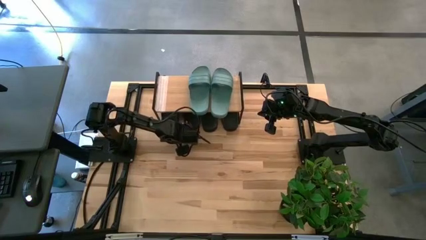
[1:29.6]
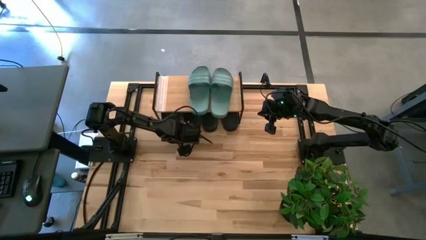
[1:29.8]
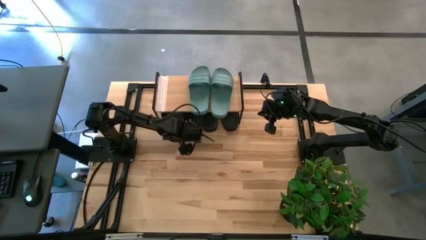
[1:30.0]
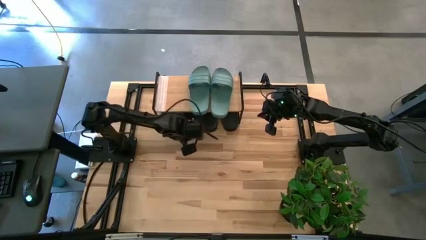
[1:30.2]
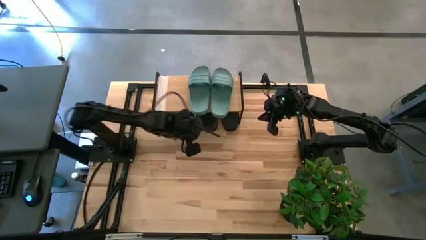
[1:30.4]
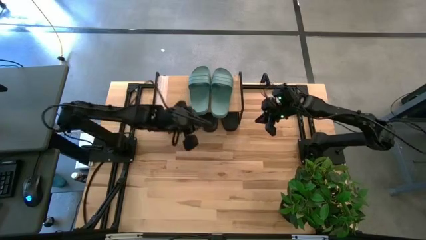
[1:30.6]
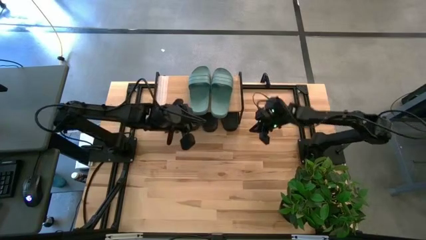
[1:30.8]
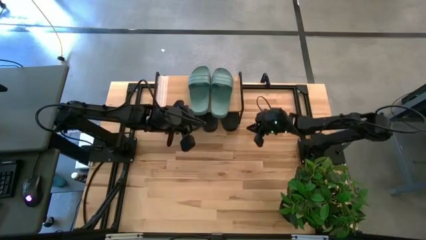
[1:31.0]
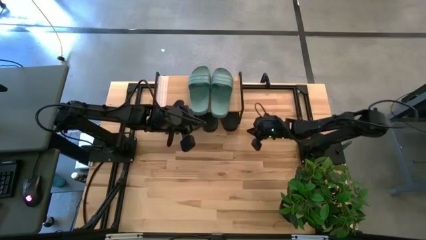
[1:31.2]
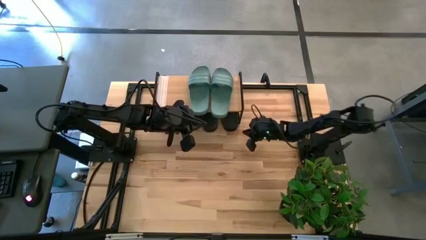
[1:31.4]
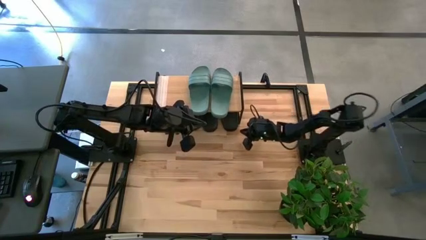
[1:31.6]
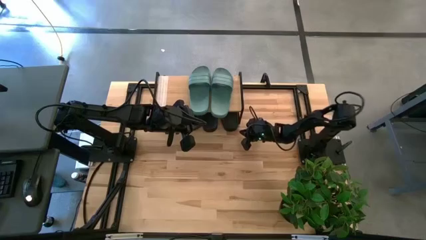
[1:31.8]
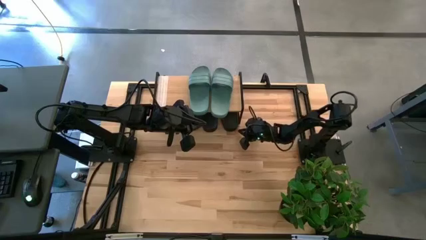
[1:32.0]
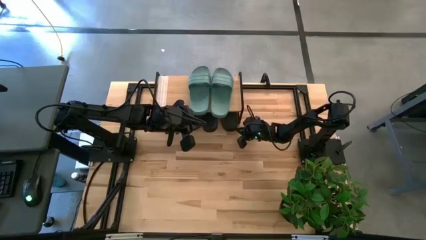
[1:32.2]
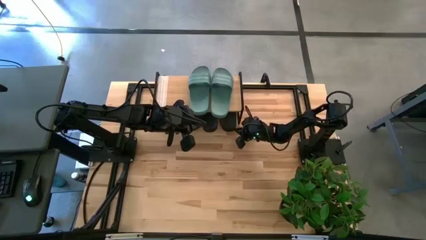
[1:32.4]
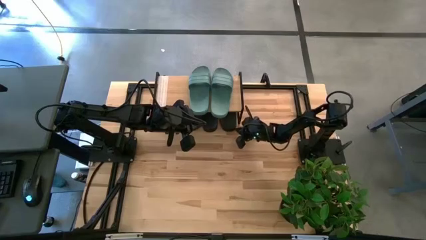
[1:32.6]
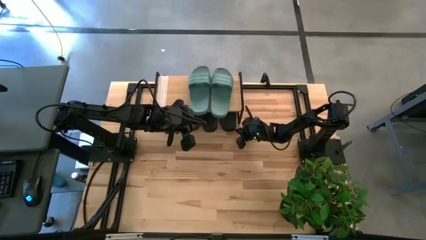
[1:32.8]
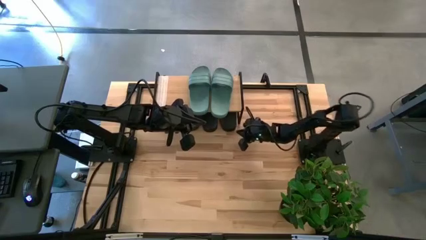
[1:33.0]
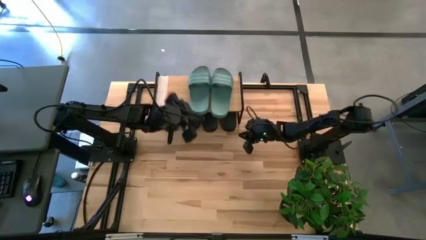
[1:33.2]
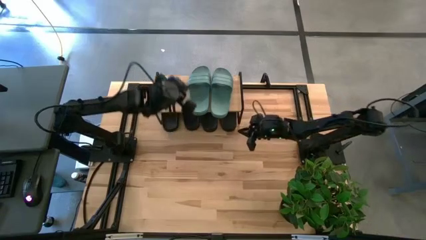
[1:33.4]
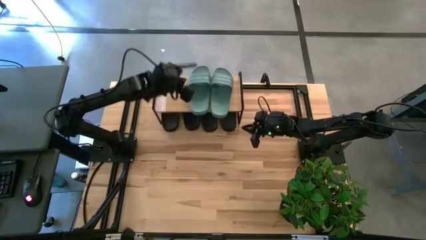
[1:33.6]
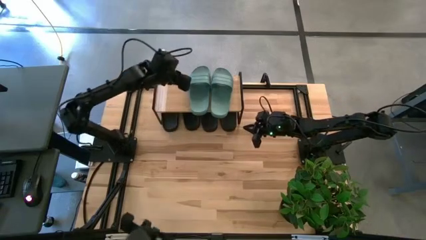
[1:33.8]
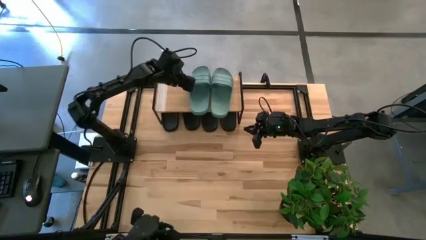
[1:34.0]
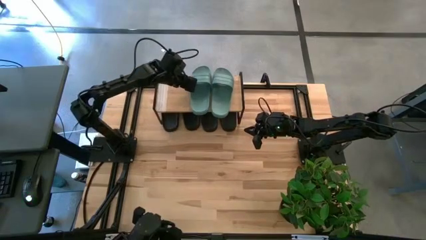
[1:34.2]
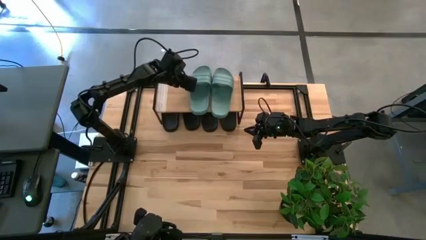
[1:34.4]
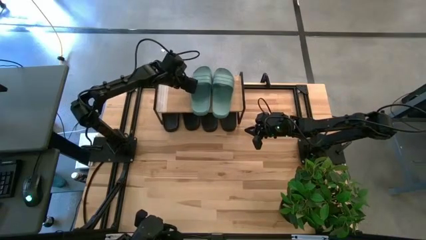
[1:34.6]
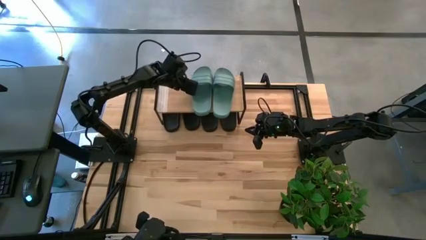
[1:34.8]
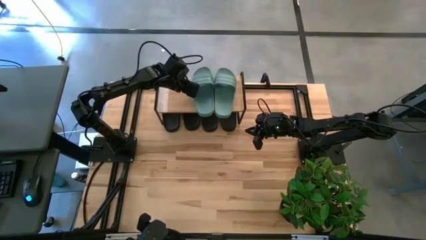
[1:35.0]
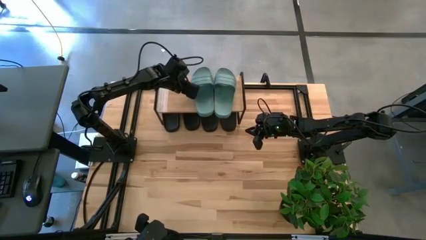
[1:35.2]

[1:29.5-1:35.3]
Task: Pick and place slides into the shelf
Adjust the slides

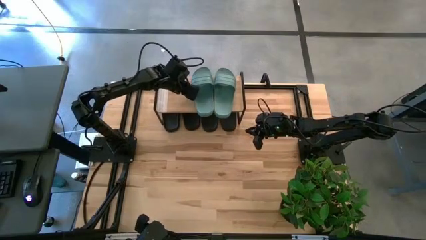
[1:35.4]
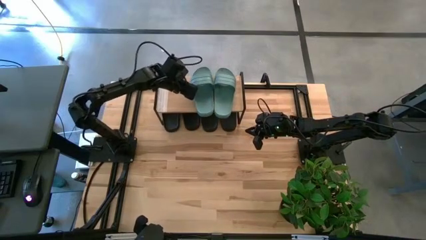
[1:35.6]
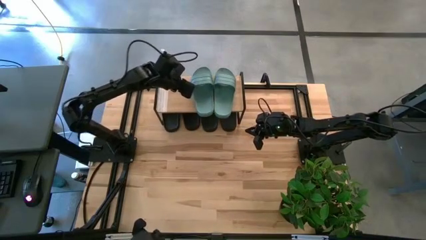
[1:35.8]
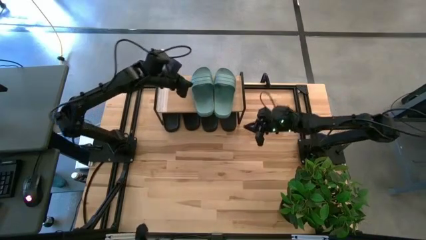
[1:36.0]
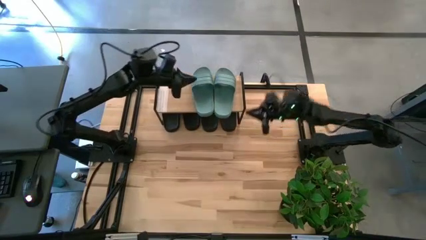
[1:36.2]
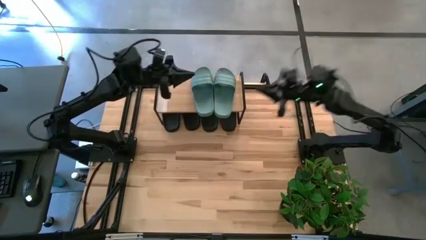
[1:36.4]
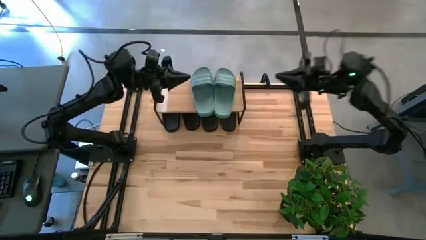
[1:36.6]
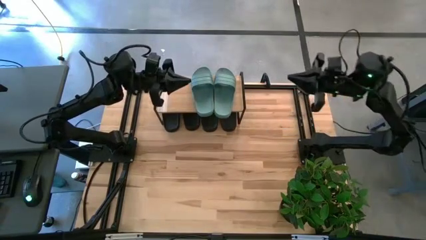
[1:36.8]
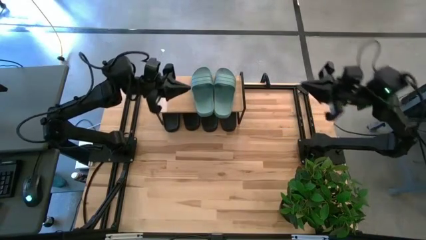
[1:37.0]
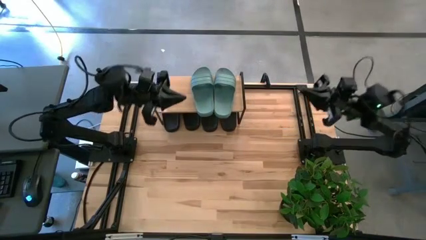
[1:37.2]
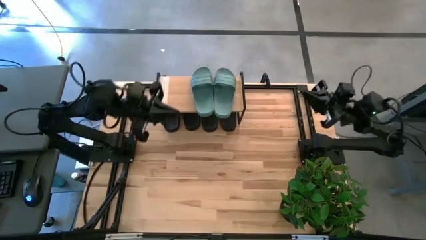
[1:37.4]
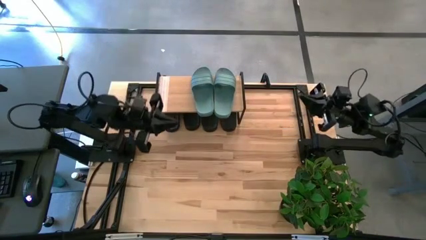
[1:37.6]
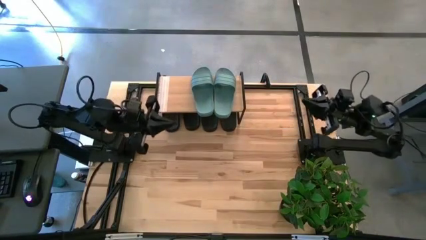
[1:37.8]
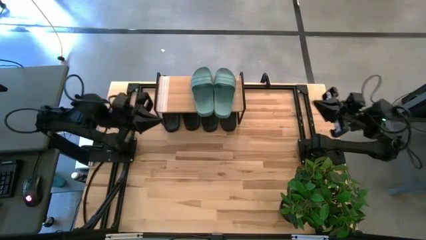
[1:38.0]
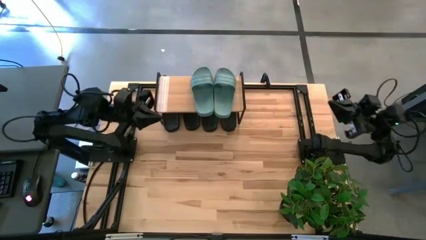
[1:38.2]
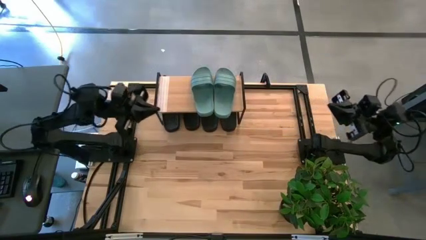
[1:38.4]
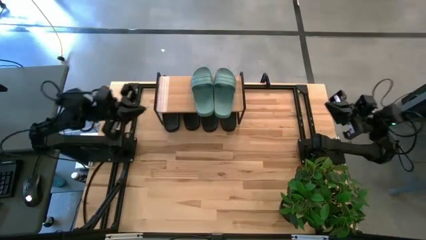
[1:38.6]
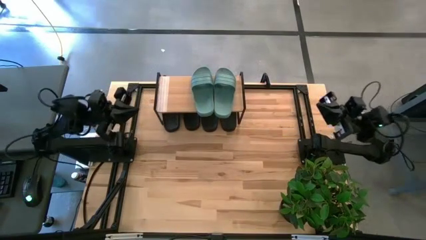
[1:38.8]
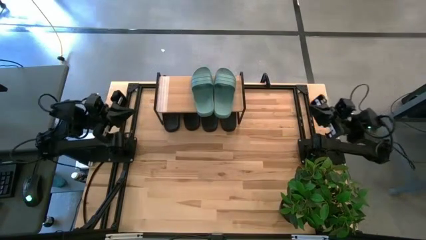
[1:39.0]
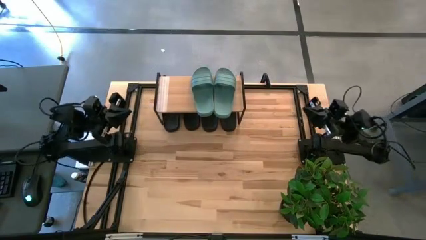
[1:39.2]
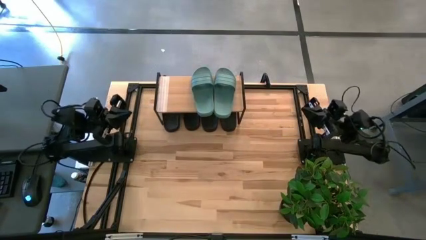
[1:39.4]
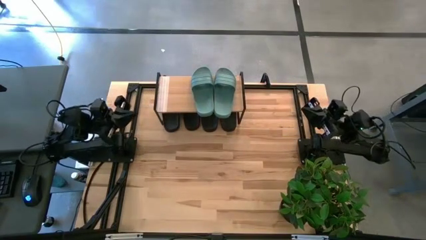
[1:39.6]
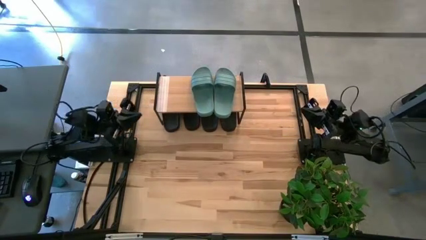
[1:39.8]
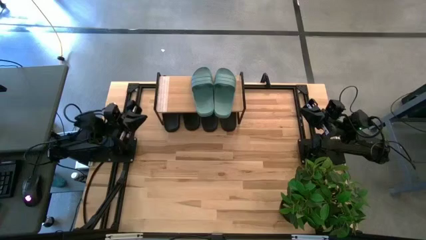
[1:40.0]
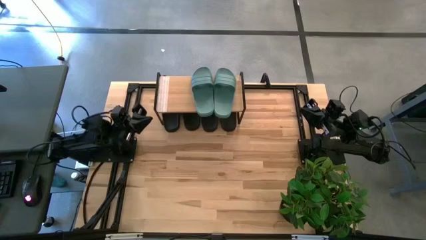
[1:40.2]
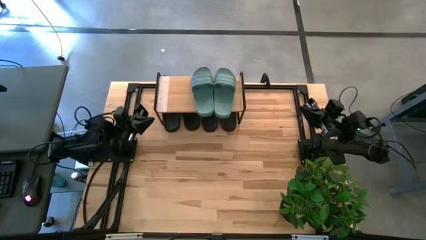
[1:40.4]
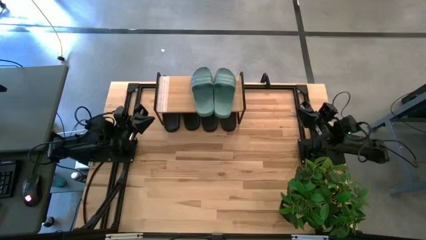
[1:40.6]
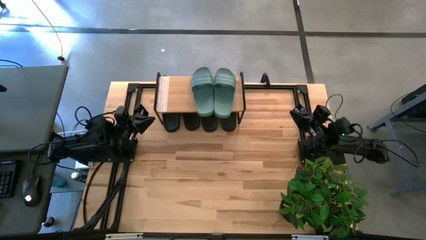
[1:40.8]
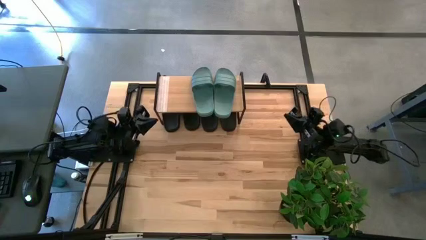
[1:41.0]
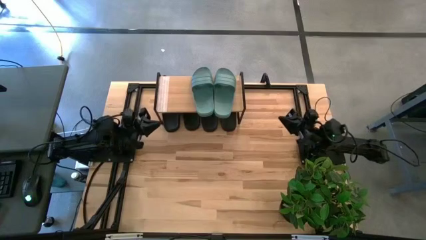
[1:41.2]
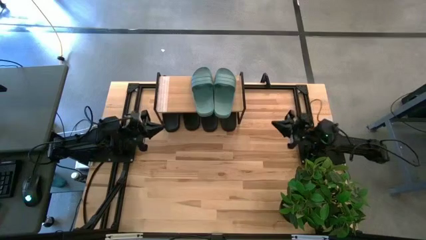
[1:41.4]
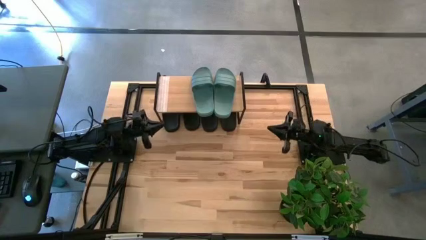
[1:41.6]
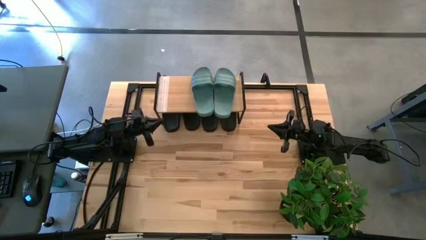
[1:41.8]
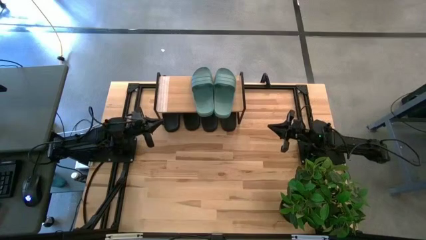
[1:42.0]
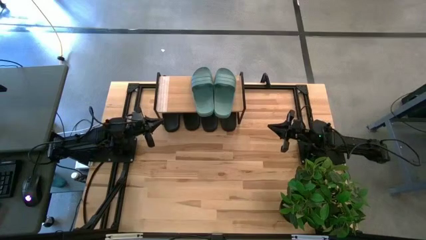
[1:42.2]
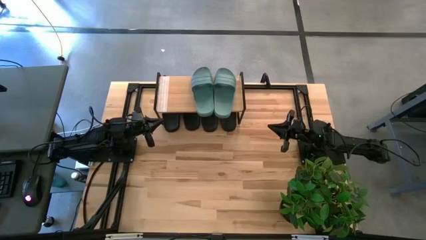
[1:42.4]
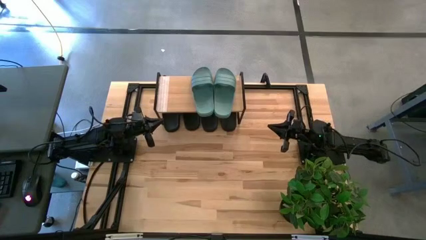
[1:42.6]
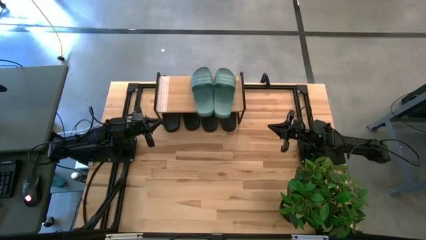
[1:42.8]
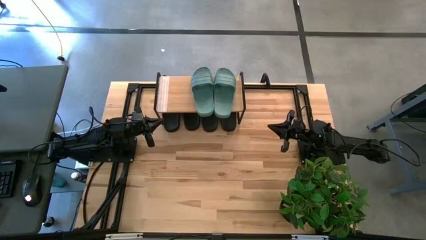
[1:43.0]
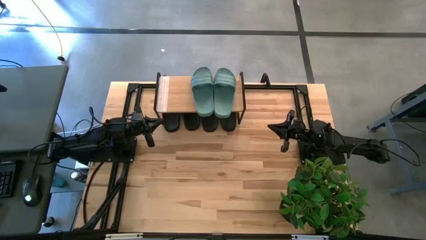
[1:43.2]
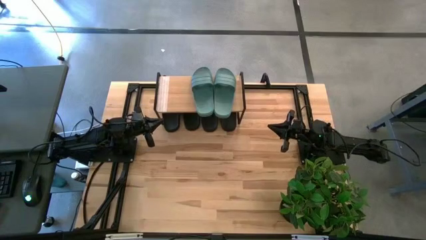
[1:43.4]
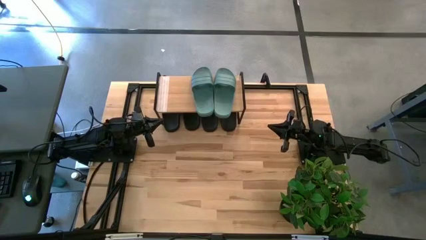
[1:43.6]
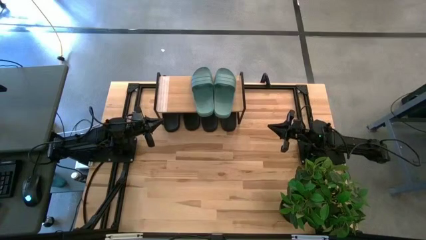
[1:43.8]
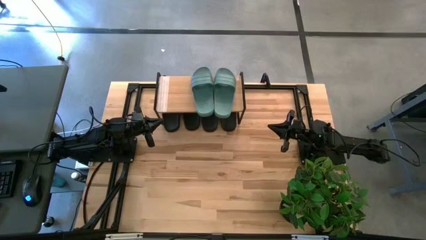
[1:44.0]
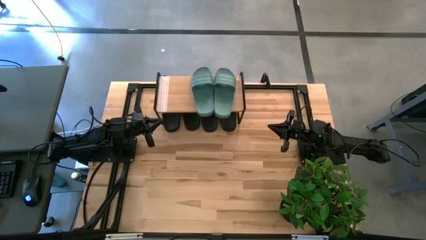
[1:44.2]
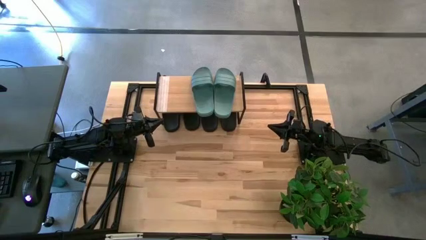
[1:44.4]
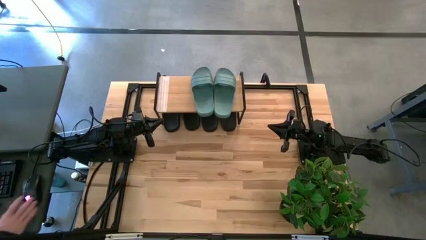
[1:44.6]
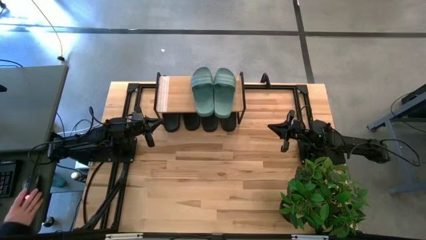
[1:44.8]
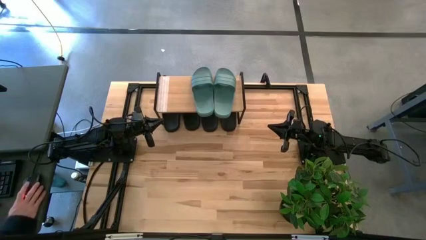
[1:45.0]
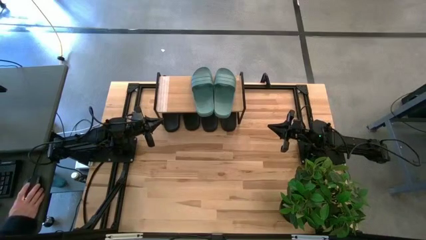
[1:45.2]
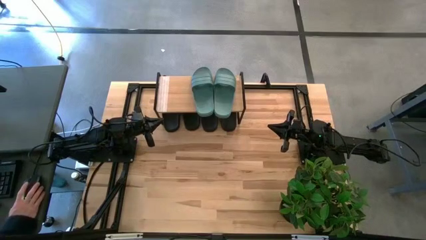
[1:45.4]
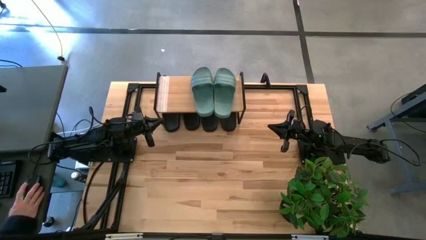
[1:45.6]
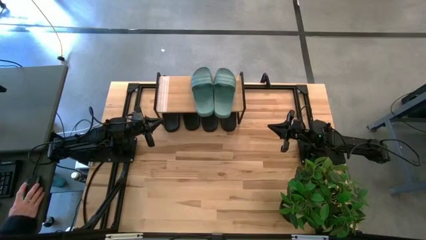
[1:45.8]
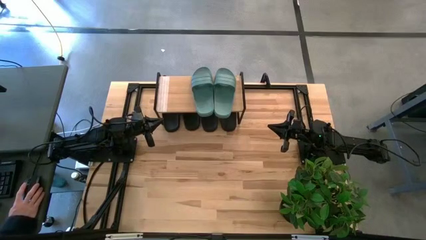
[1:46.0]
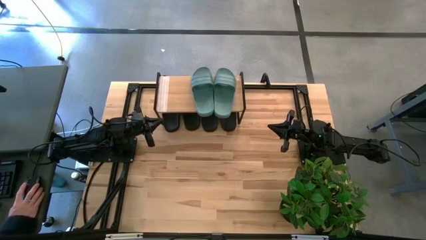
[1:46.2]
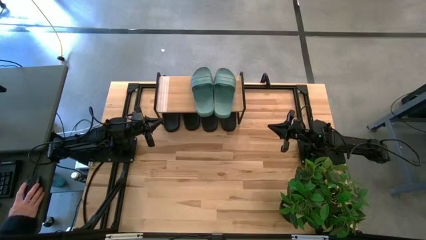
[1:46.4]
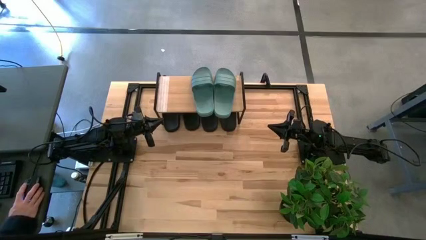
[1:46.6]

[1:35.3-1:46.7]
Return to Home Position
